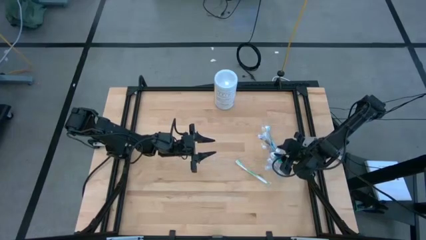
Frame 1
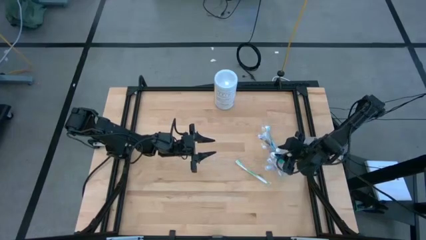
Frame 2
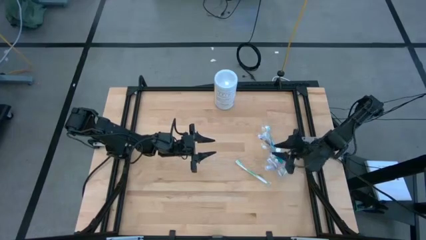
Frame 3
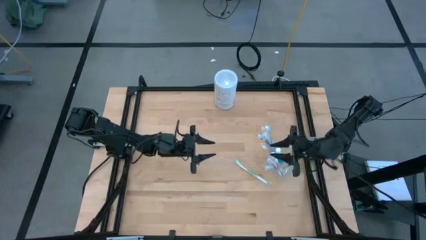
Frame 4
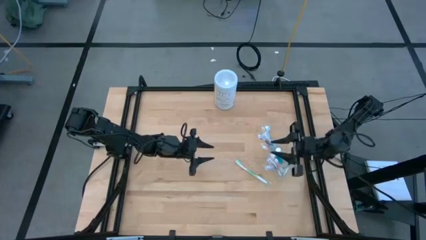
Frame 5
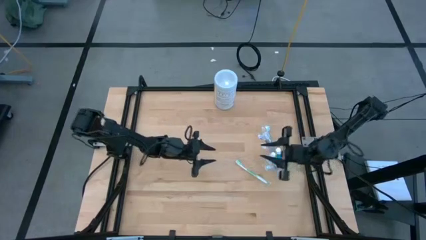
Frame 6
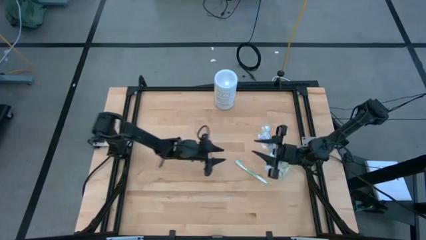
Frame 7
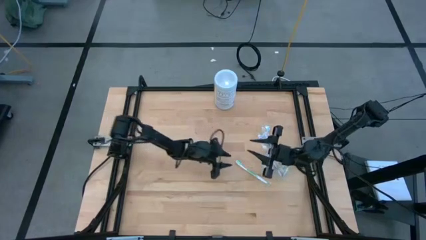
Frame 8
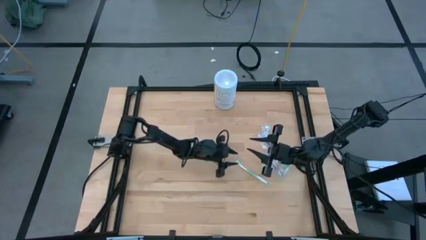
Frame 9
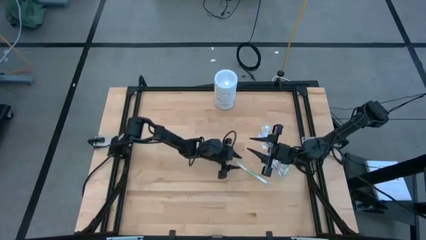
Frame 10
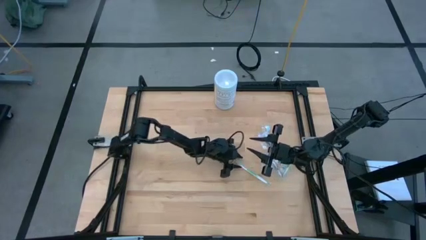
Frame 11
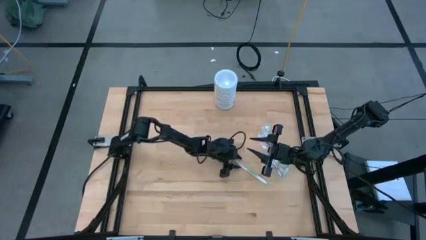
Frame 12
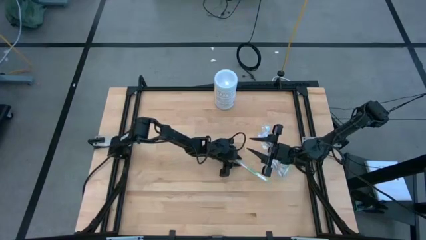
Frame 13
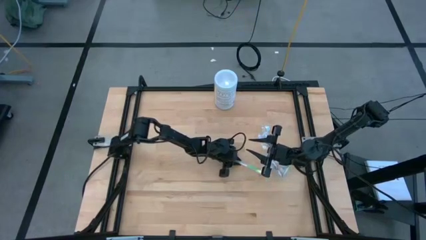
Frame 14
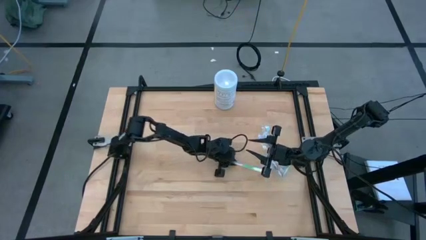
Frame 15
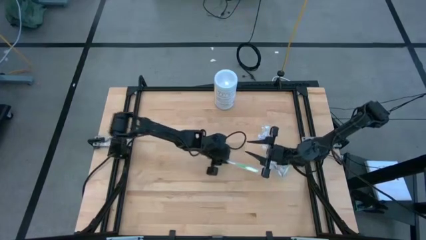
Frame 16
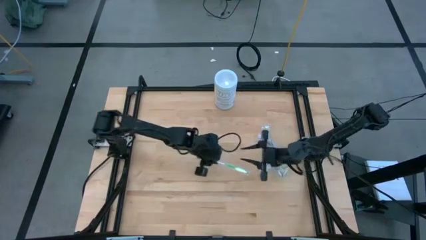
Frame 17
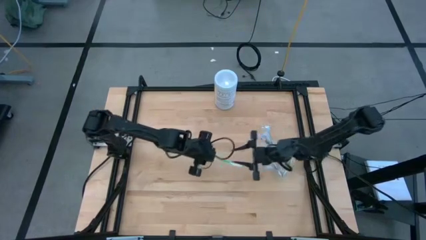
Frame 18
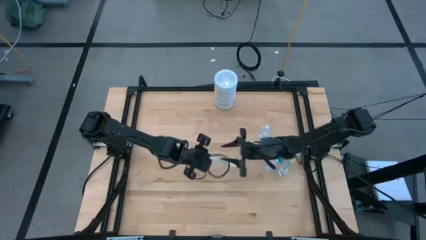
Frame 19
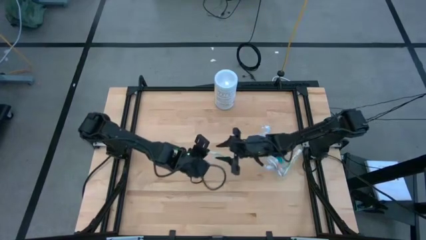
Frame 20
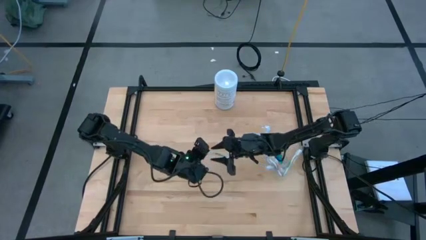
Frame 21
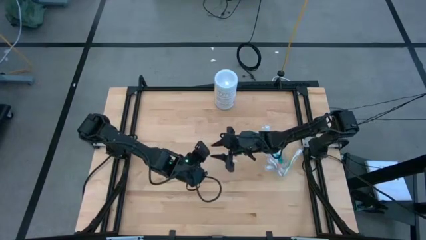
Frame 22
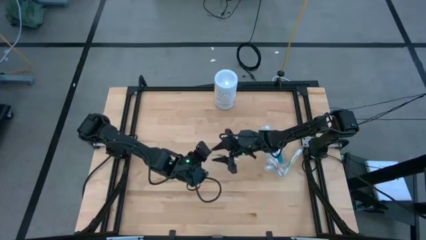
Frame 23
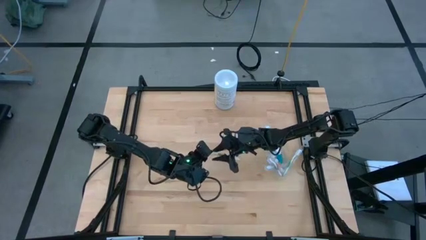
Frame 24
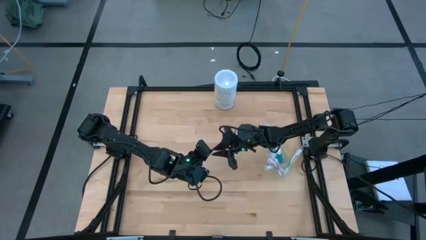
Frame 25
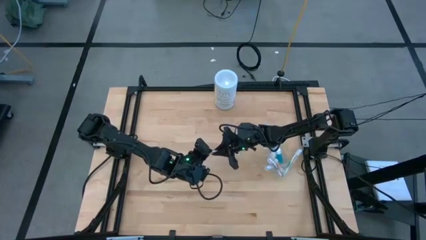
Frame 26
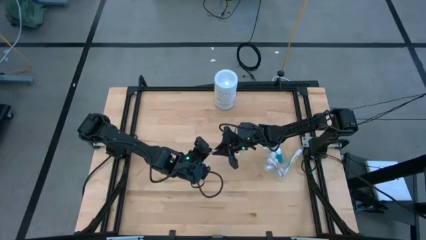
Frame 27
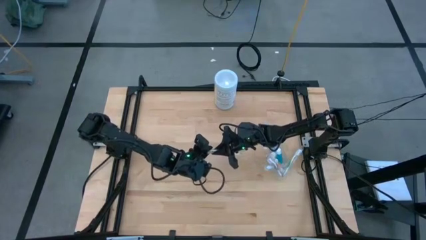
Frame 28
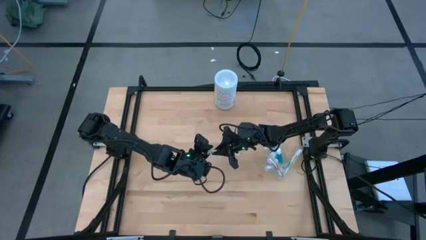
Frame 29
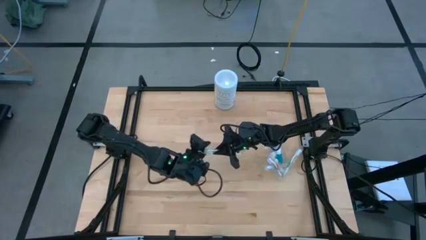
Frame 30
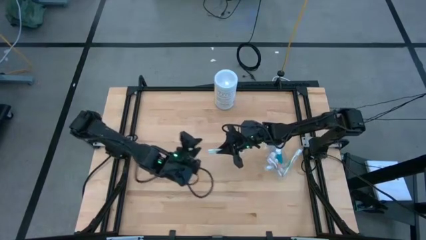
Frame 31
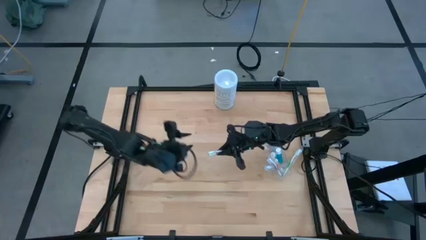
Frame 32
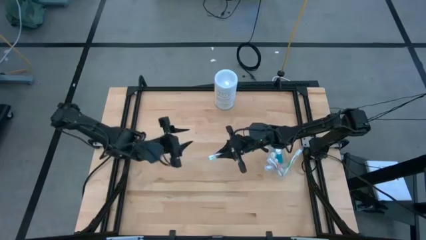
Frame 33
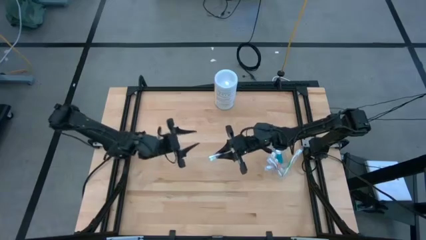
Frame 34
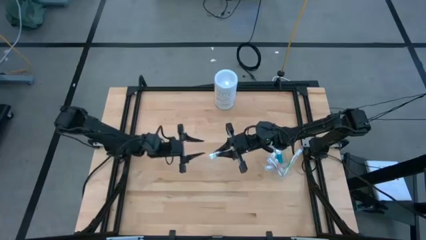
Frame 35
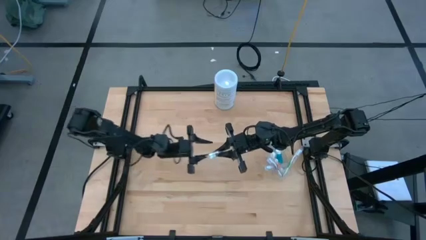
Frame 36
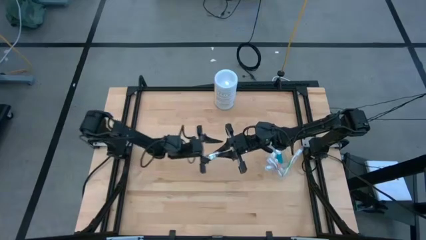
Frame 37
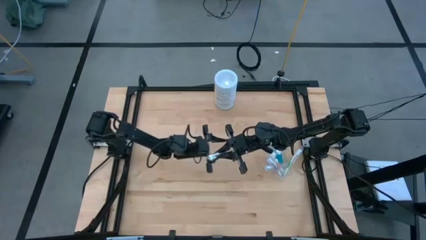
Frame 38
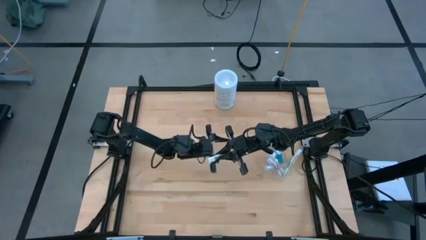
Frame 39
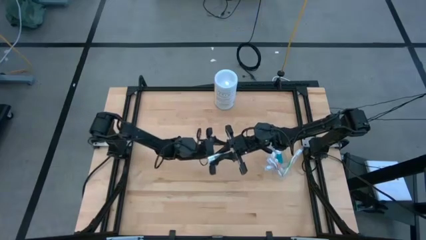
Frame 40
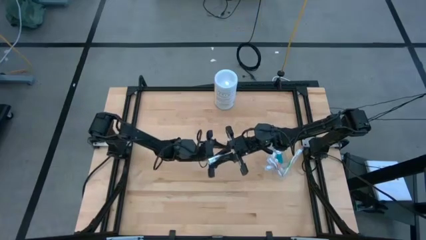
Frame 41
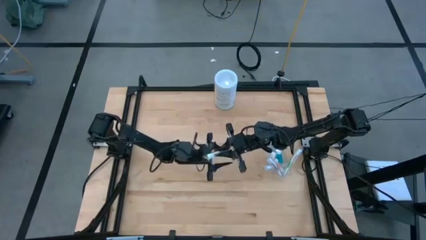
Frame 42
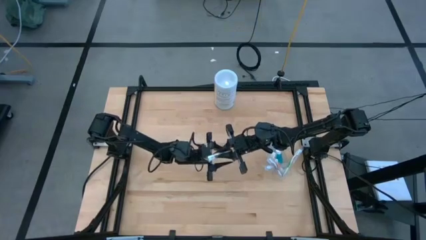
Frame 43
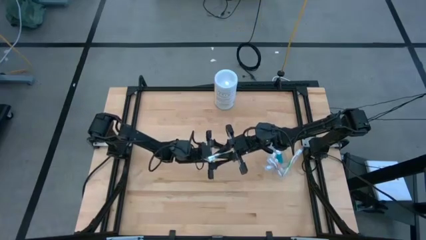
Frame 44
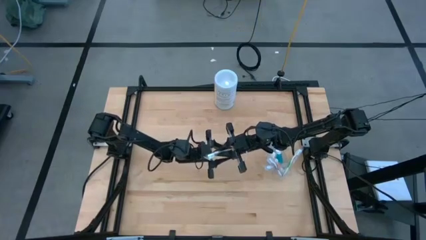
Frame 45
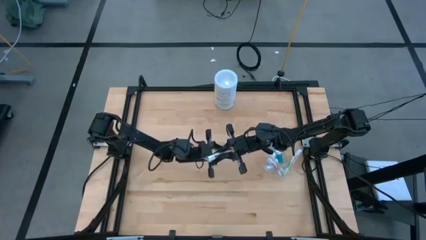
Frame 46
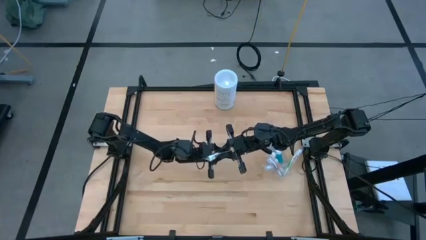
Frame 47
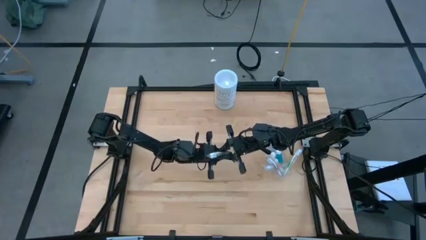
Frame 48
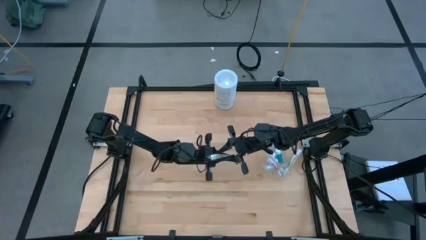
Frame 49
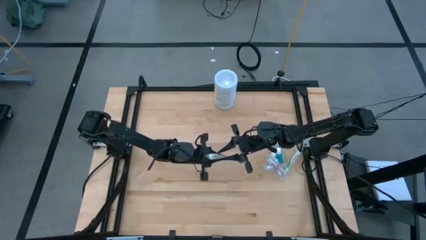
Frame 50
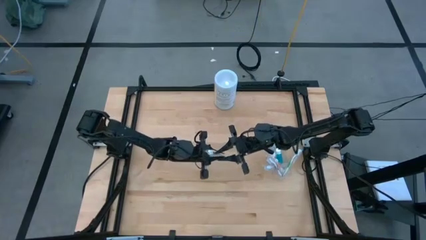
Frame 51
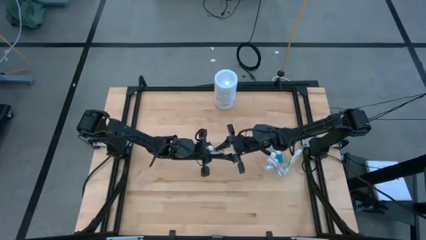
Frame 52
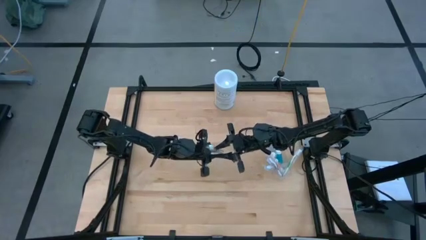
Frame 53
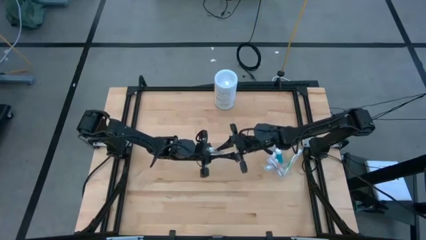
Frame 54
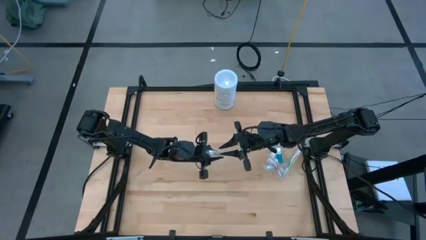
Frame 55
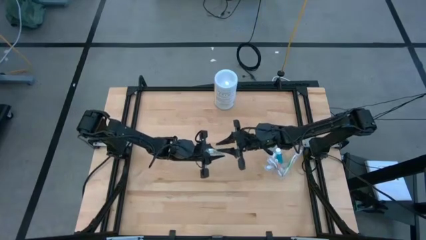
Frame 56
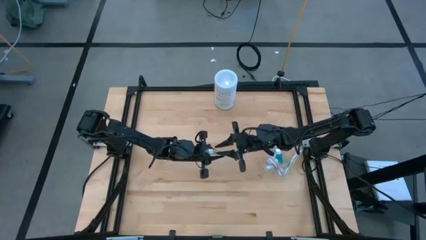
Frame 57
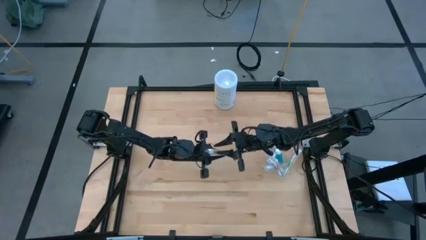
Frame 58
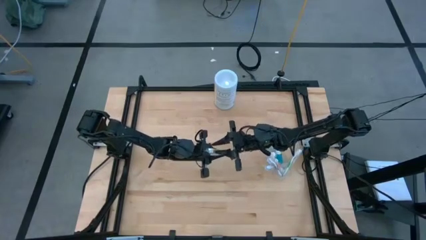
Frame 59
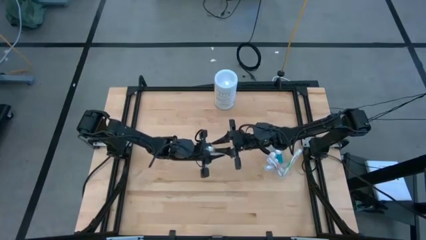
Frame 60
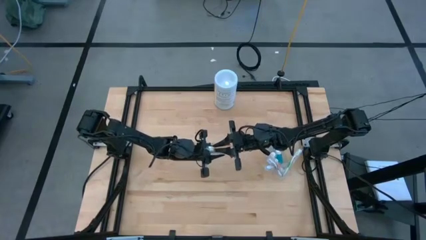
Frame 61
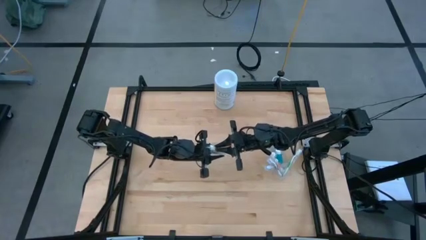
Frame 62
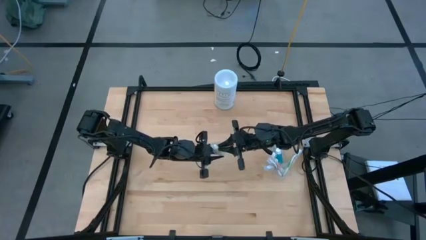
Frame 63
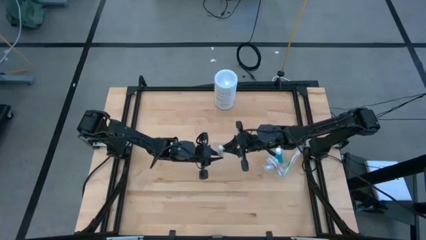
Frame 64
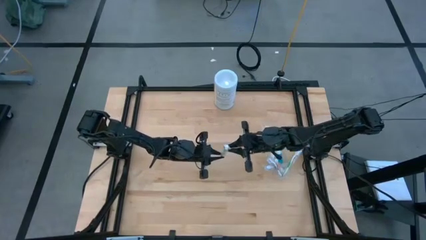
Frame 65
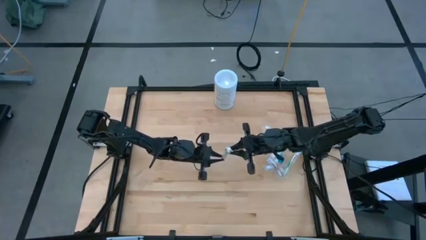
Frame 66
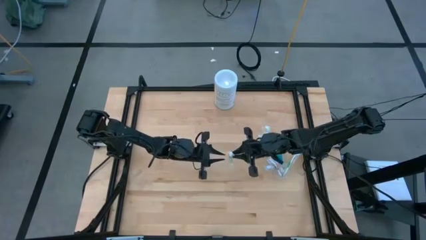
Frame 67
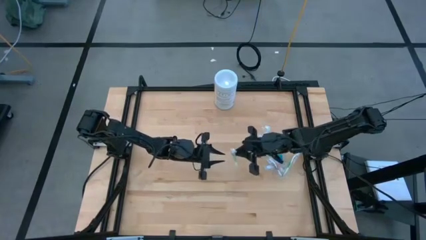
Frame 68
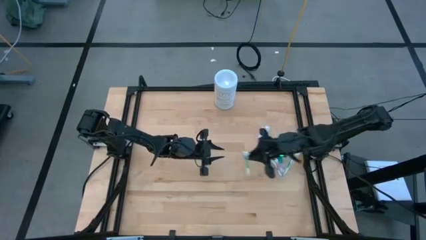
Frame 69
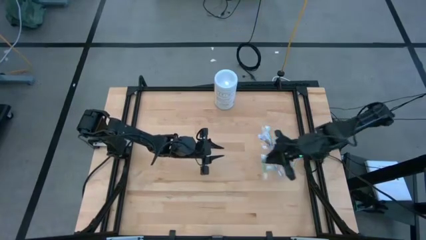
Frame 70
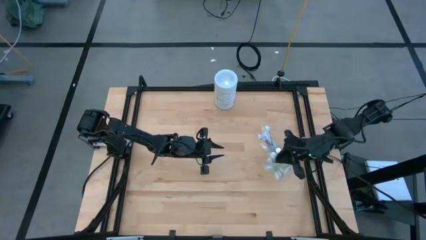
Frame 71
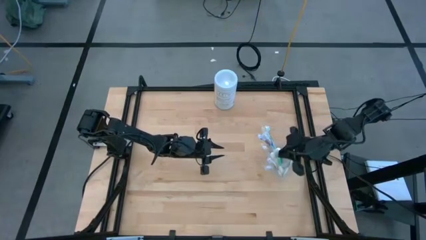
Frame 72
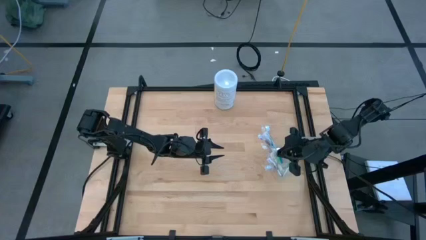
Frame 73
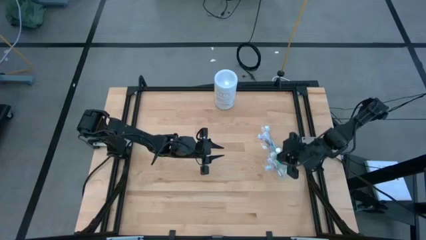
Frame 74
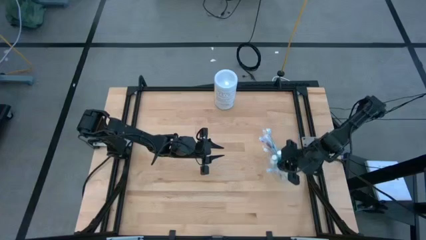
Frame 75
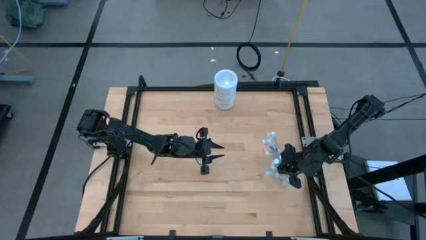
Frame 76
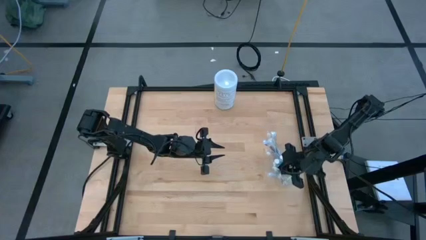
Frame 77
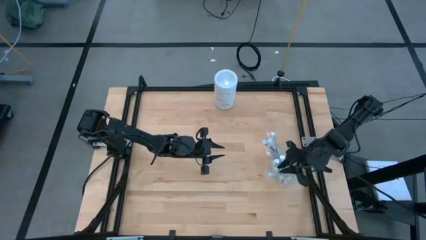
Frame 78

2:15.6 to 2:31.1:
Task: Pick & Place toothbrushing station
Put the green toothbrush into the transparent organizer
